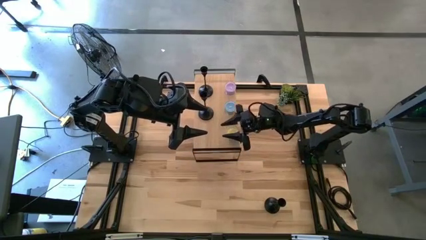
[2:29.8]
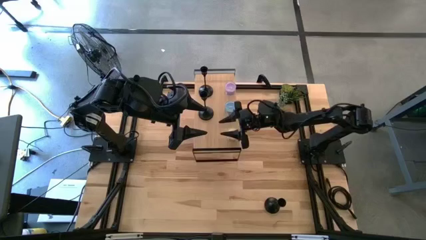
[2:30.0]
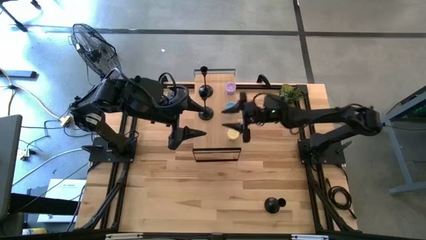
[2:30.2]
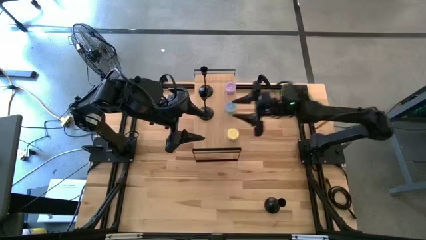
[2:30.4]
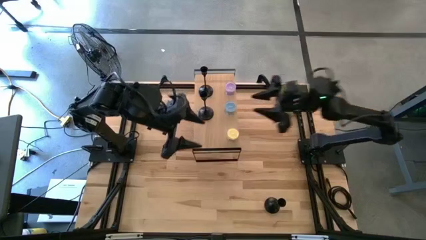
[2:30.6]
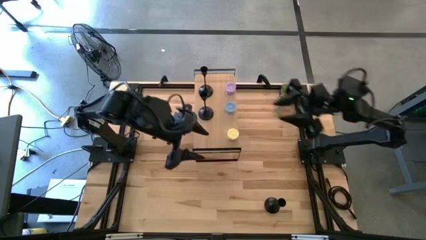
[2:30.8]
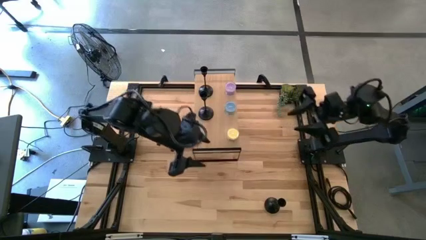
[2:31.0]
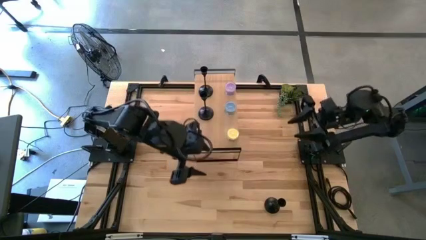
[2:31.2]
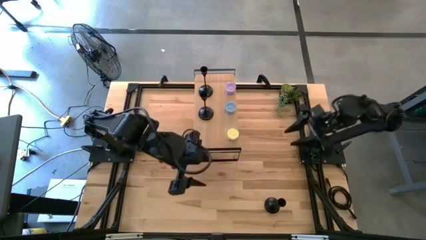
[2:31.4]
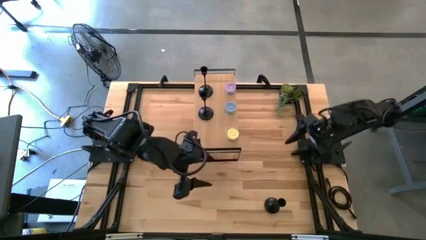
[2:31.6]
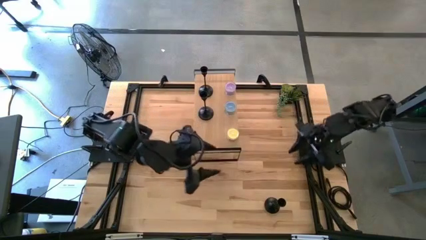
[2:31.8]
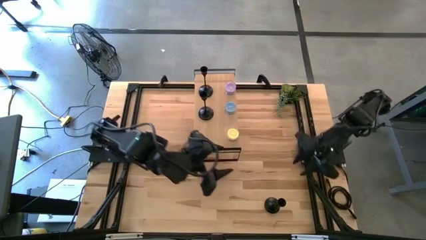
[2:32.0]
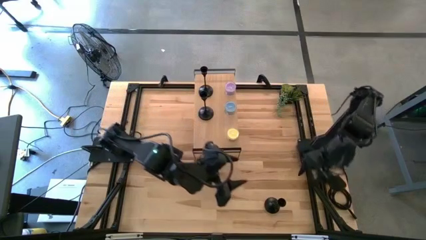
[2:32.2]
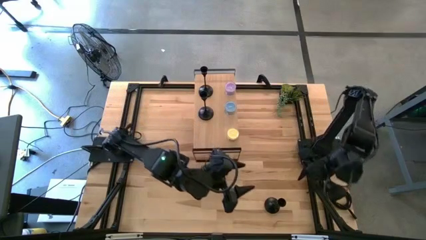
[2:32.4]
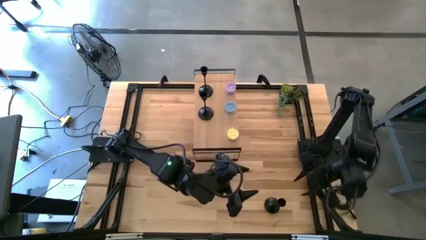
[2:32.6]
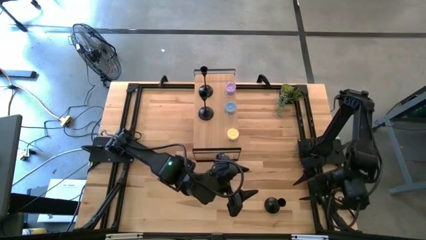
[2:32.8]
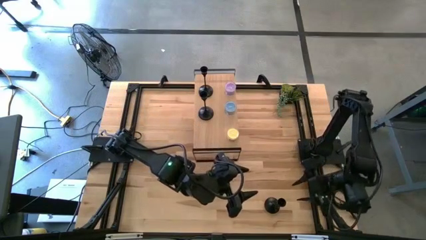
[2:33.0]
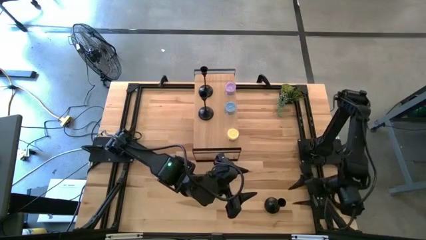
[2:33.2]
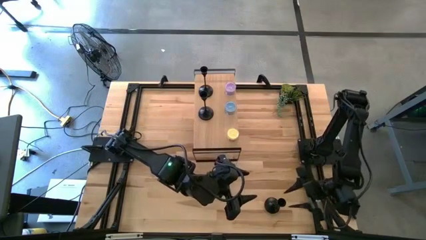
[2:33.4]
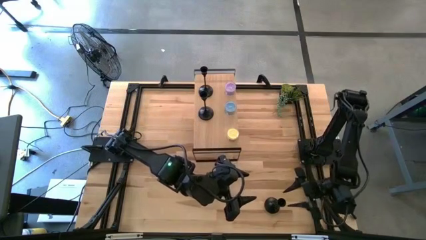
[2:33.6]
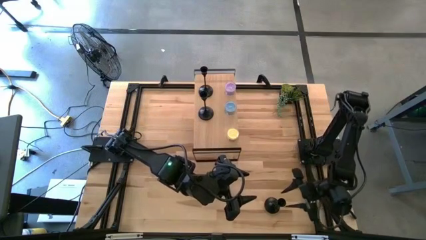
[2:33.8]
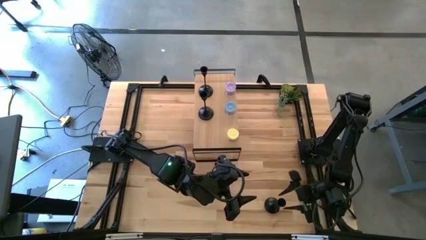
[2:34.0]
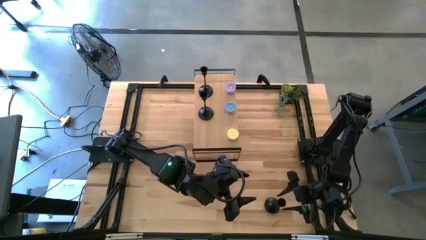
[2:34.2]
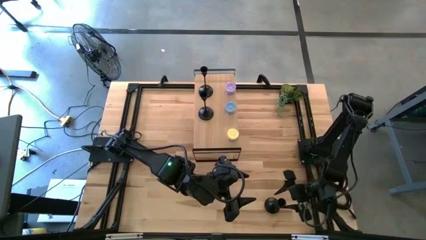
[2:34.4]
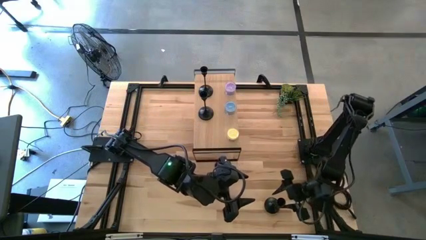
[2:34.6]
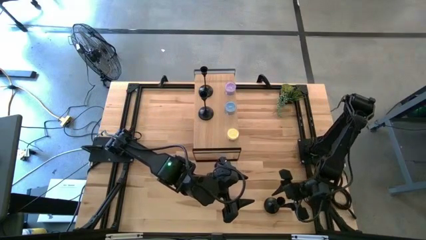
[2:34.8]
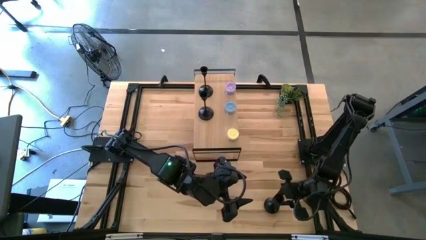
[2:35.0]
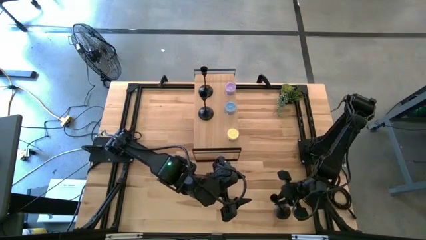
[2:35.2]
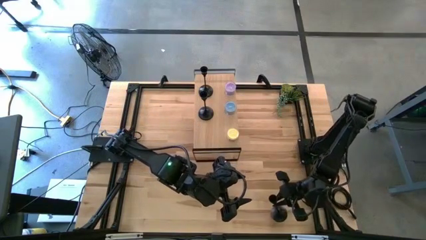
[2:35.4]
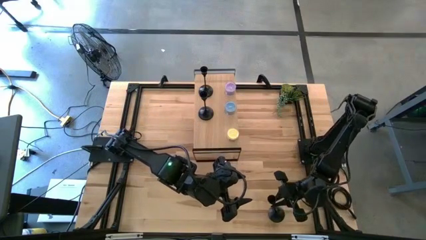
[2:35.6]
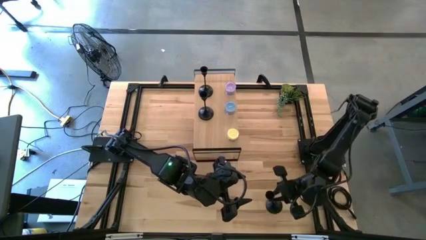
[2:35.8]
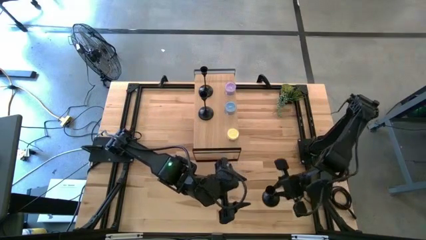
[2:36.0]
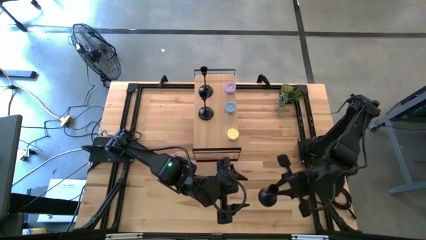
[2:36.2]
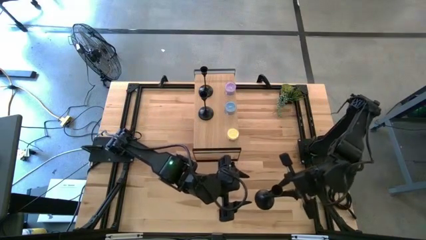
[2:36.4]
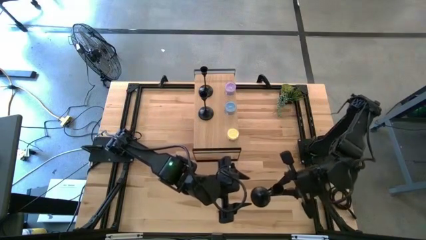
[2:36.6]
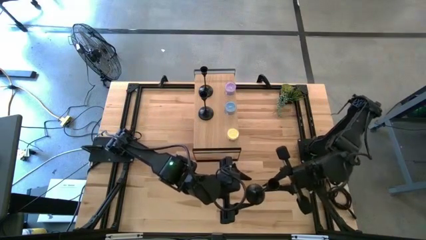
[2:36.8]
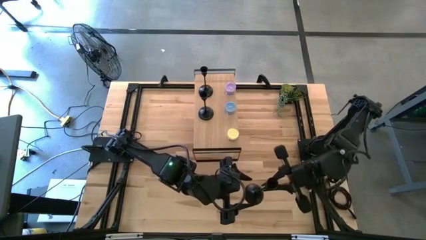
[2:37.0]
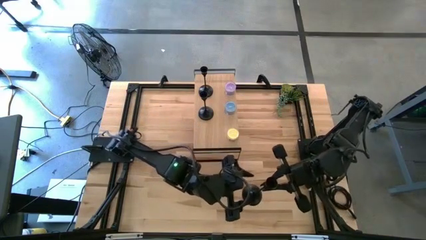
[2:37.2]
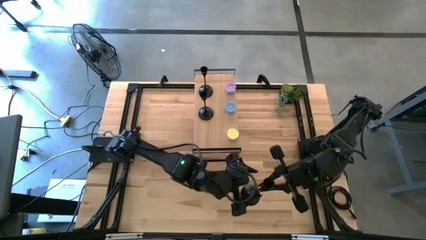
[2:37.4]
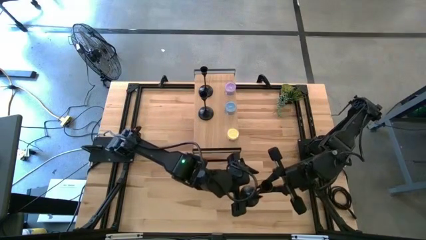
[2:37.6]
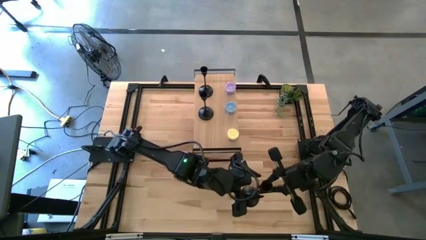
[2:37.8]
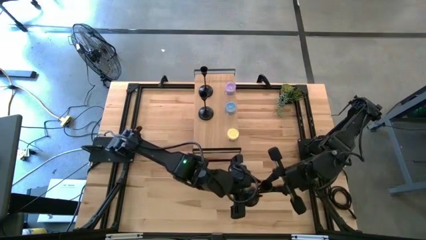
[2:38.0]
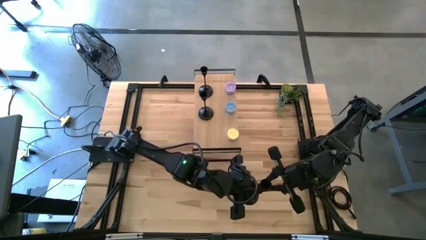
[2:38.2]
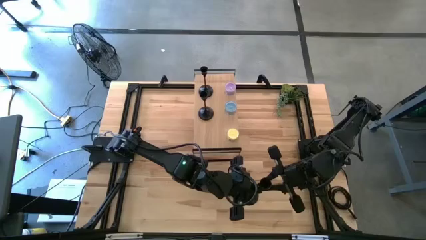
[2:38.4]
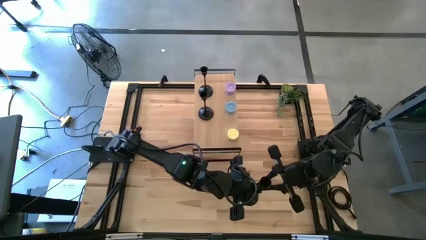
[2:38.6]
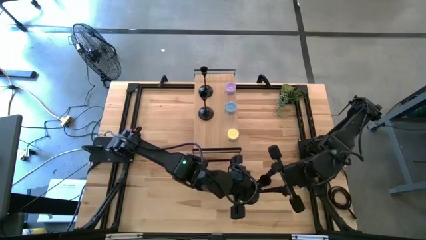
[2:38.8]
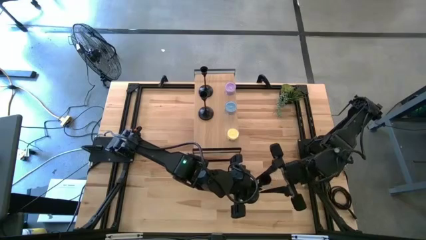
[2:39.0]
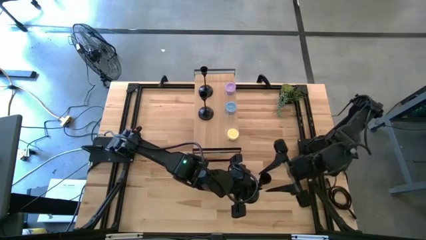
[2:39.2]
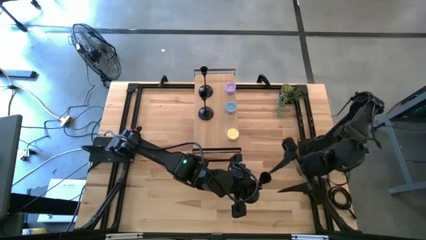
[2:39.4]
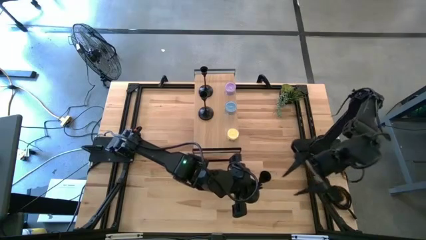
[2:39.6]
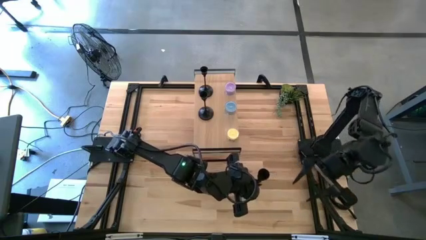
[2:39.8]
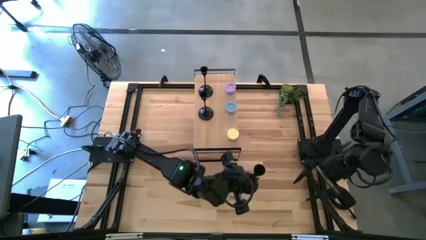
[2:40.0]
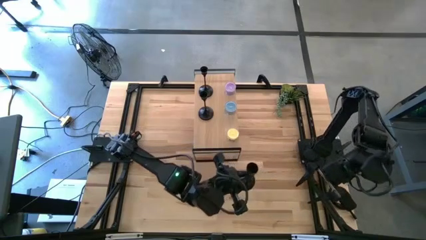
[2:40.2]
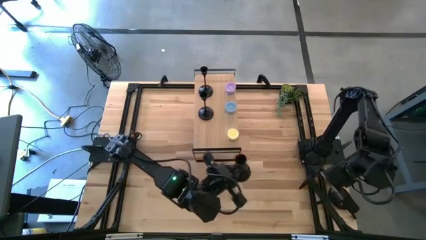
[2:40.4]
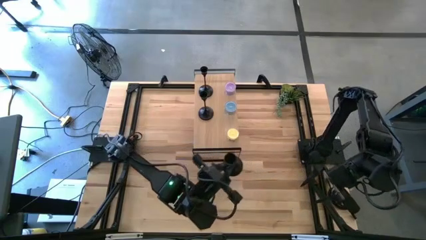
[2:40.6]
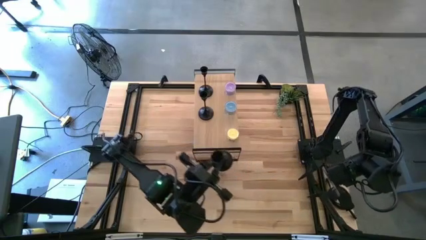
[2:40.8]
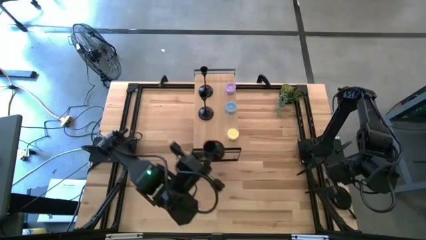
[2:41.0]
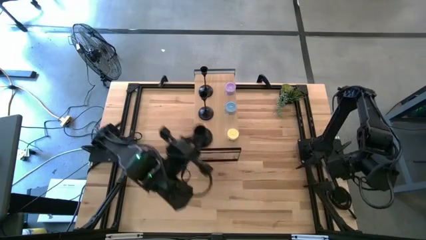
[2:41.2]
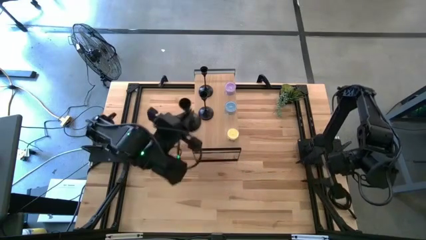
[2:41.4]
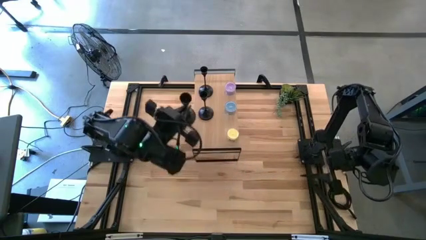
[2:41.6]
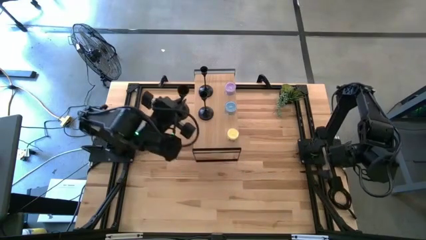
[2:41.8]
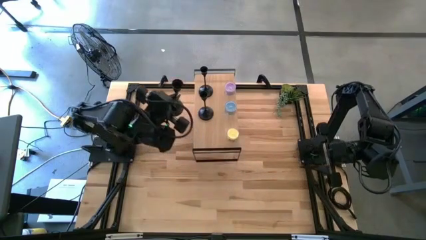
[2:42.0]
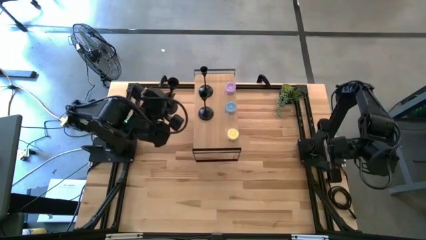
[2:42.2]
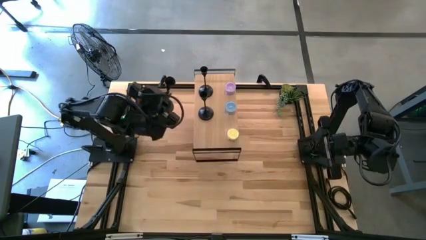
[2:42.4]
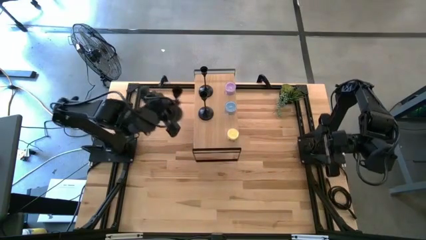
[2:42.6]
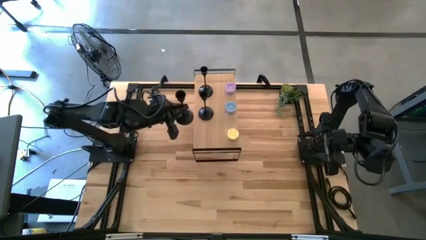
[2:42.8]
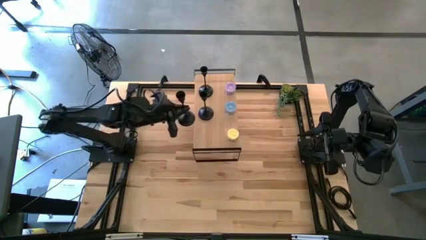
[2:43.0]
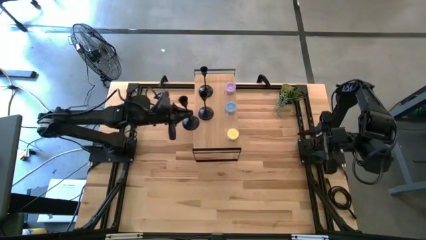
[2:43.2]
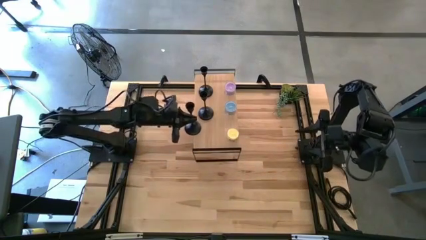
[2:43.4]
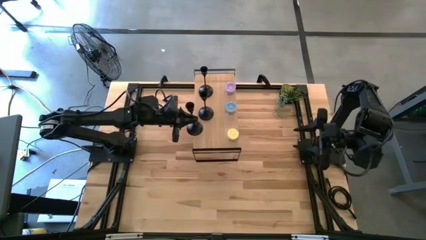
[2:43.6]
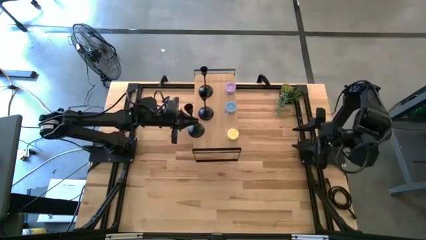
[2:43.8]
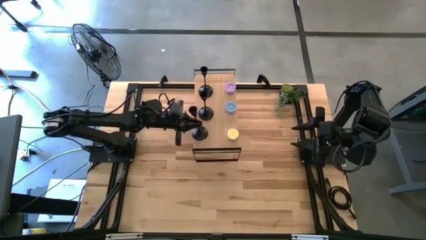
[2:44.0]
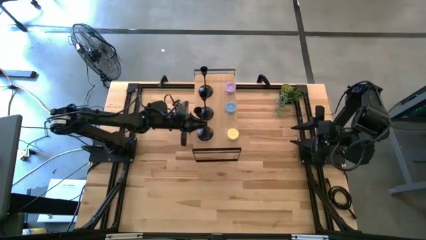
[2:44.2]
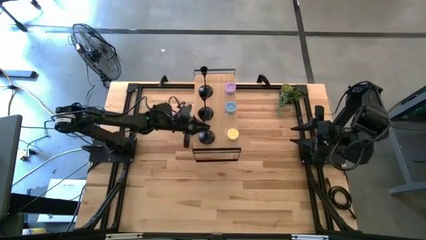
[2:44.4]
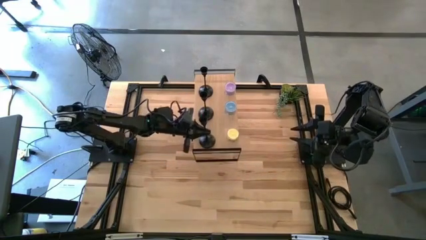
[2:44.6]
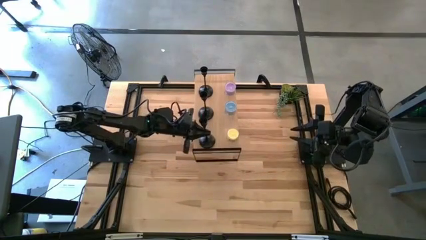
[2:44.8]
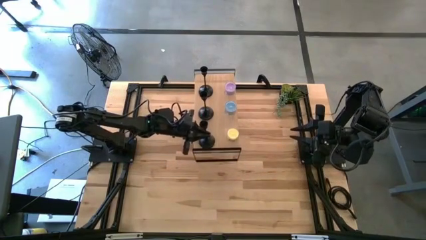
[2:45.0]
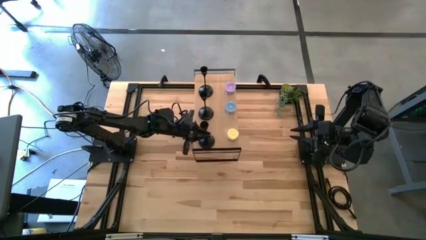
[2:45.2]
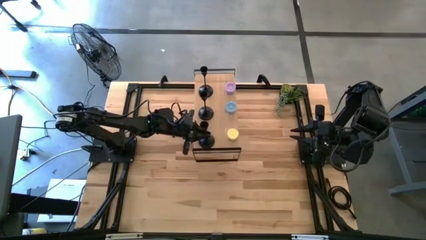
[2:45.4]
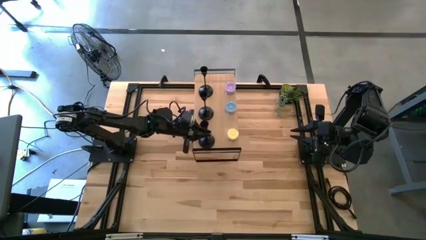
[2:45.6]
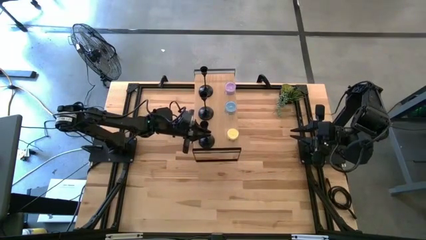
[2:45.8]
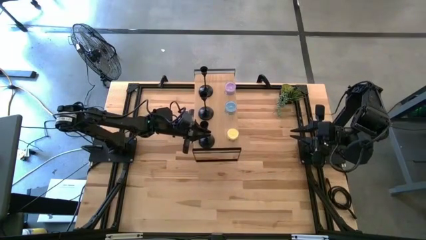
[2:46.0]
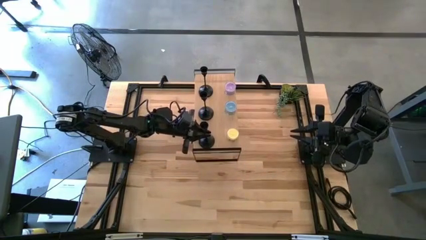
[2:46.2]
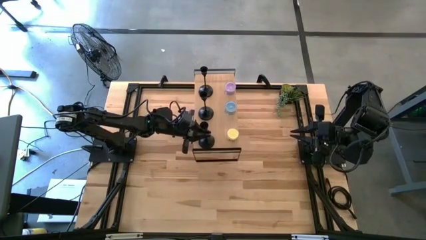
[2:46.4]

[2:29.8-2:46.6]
Task: Pick & Place candle stick holders
Put the black candle holder on the shelf

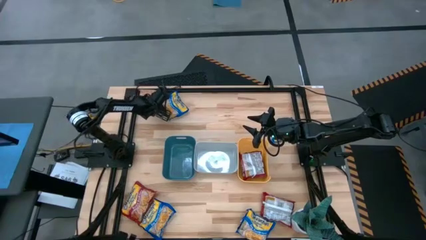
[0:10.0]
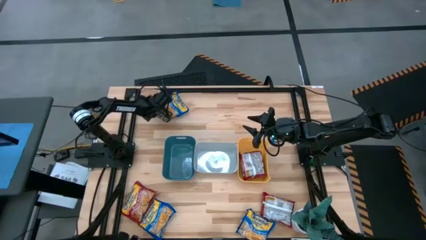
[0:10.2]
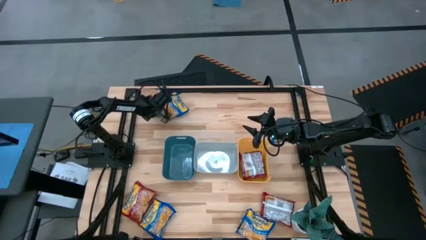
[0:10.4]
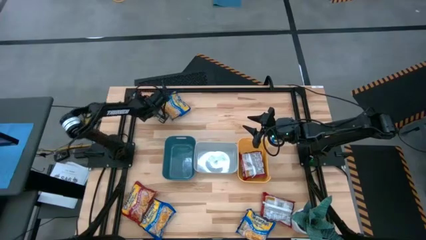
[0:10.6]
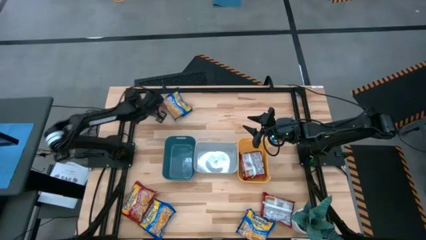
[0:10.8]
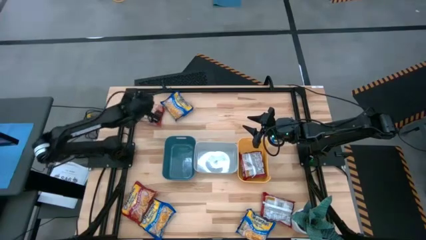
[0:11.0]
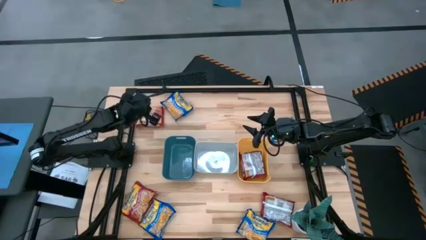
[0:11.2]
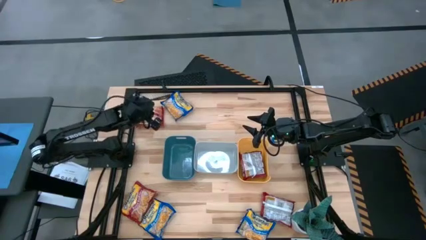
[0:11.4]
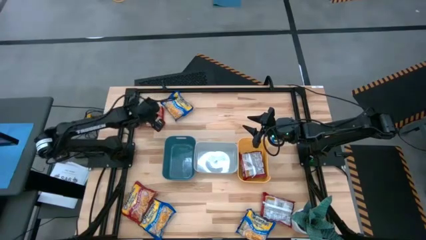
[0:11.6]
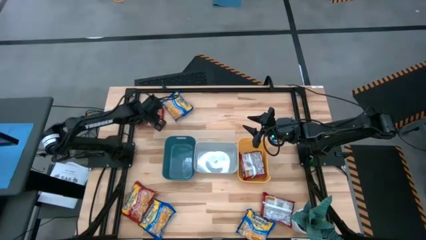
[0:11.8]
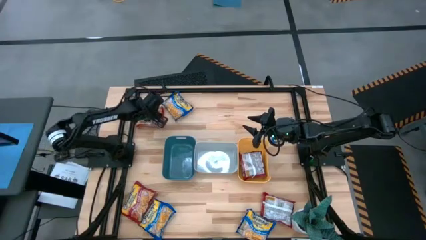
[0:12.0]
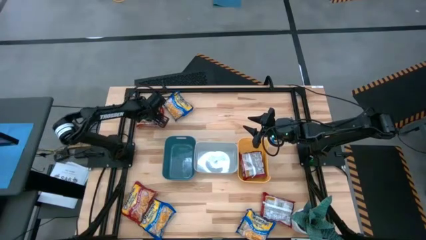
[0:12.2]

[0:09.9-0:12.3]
Task: Sort Maruchan noodles
Put the top red noodle pack into the yellow bin
